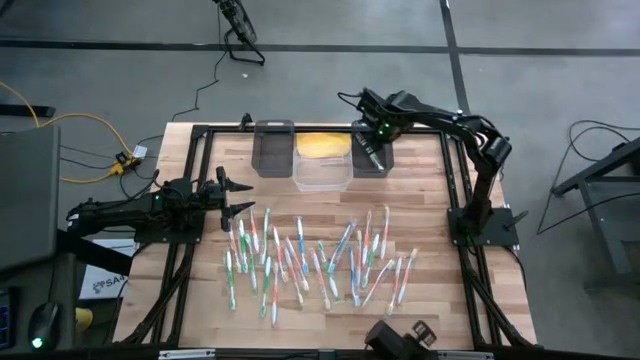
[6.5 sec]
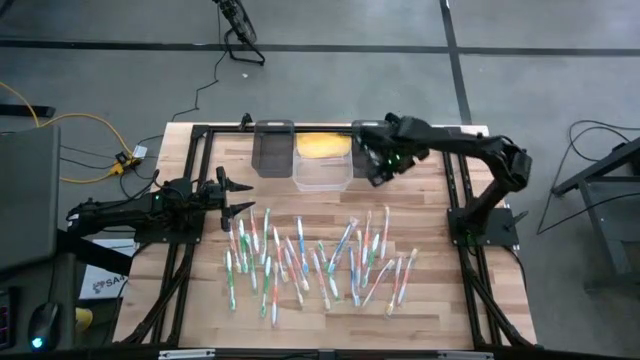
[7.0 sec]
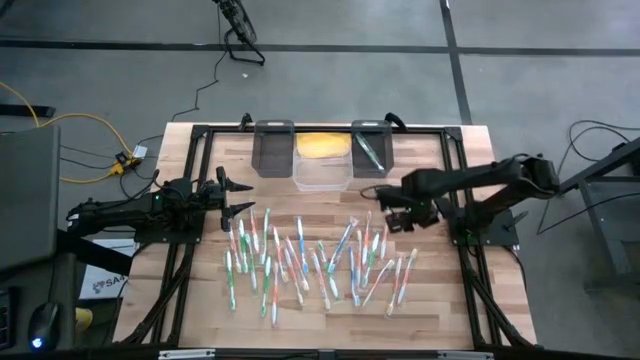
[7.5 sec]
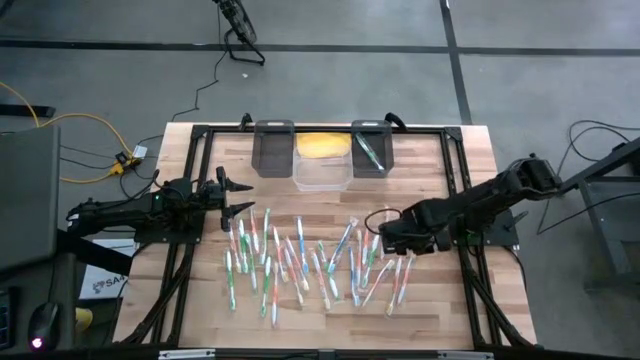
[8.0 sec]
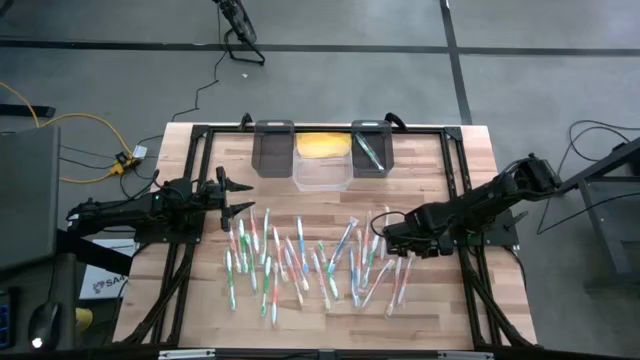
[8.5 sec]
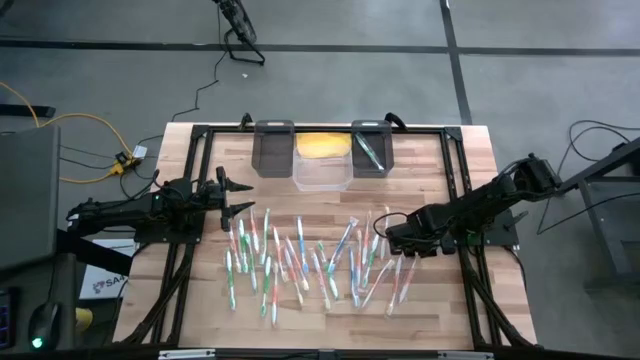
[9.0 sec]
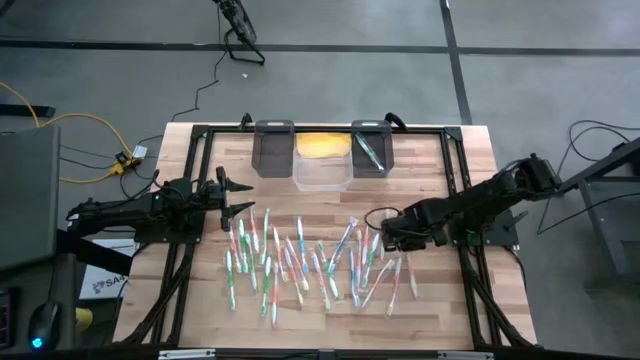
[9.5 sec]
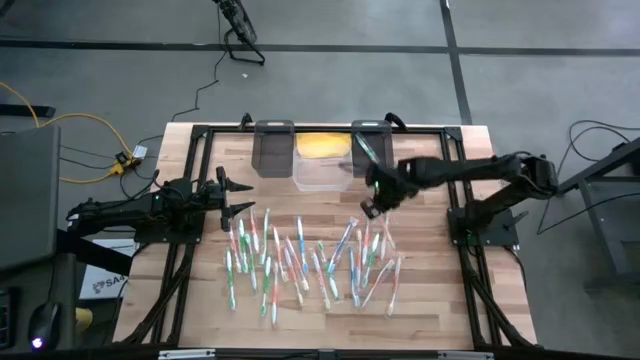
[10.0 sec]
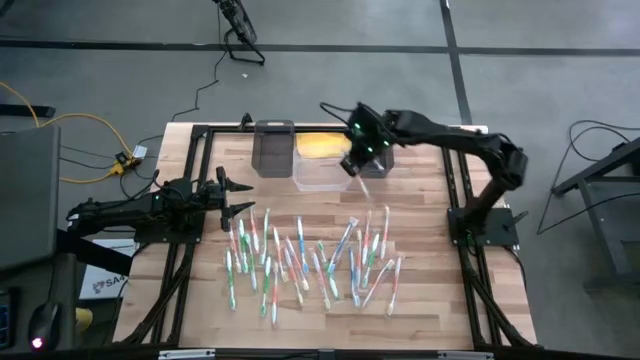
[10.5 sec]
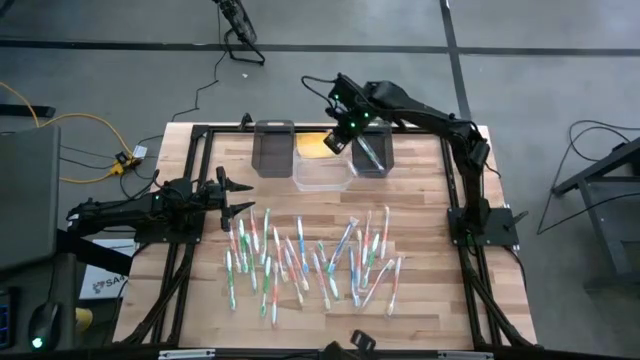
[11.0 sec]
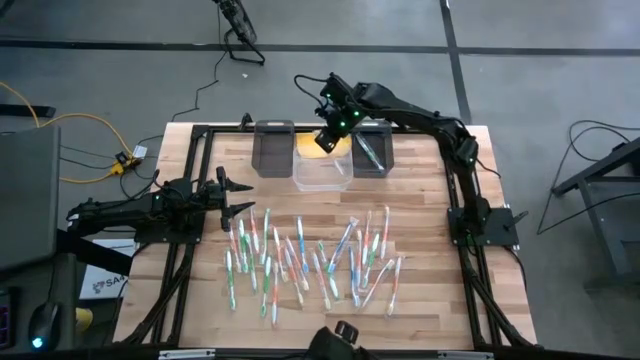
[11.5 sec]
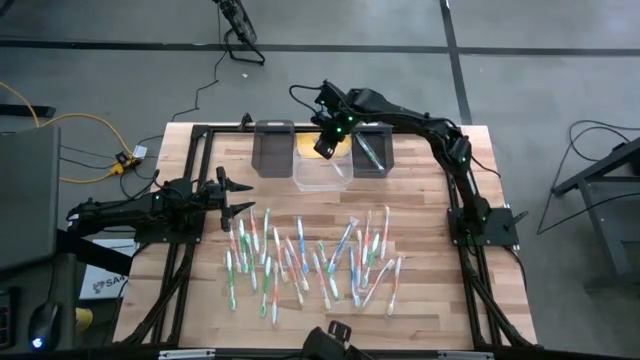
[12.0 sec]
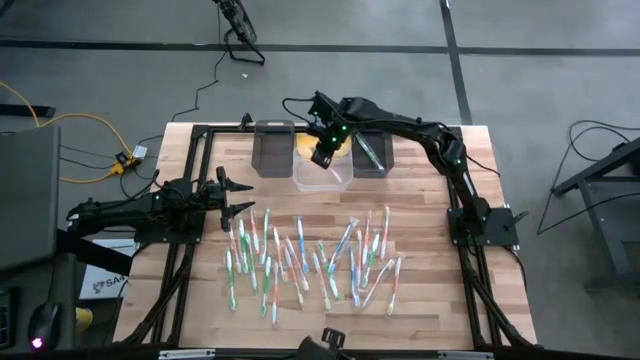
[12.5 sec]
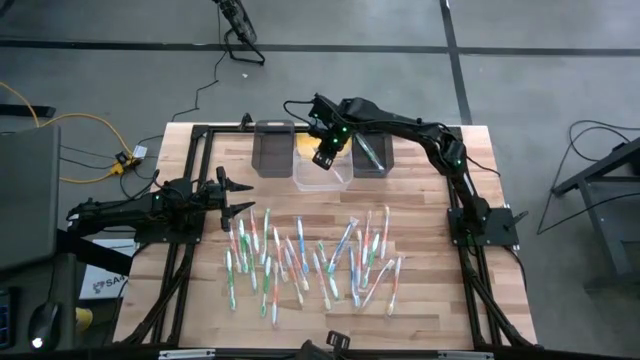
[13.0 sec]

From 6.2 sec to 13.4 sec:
Task: Pick & Place Toothbrushes
Put the orange toothbrush into the transparent bin

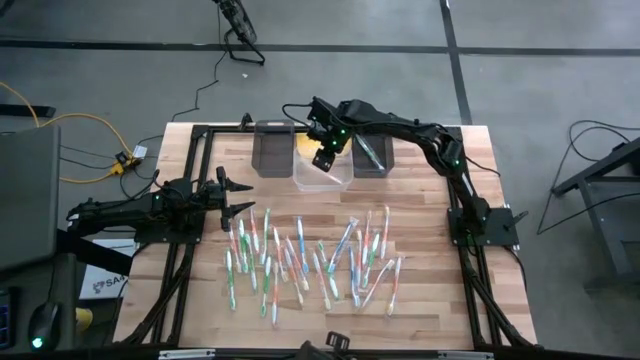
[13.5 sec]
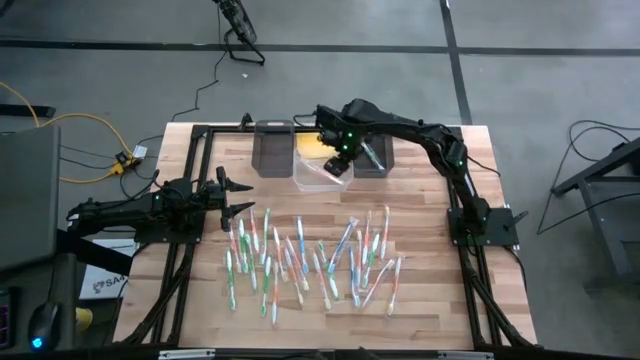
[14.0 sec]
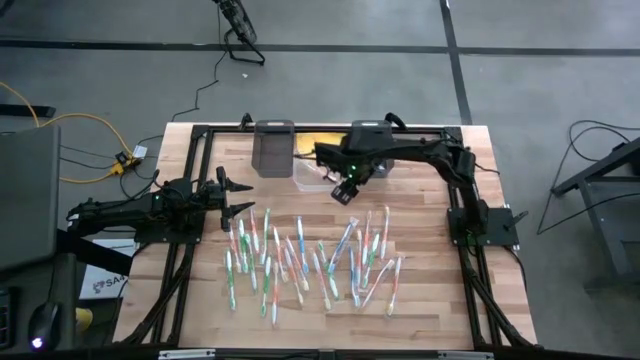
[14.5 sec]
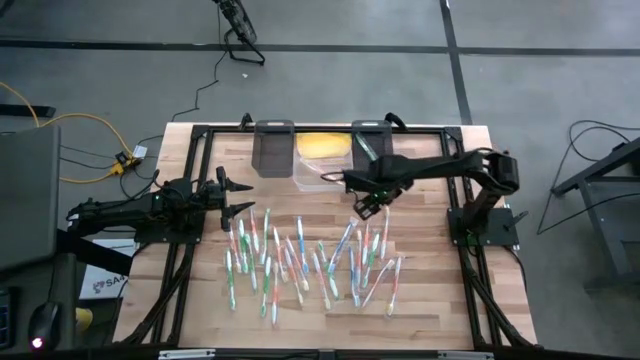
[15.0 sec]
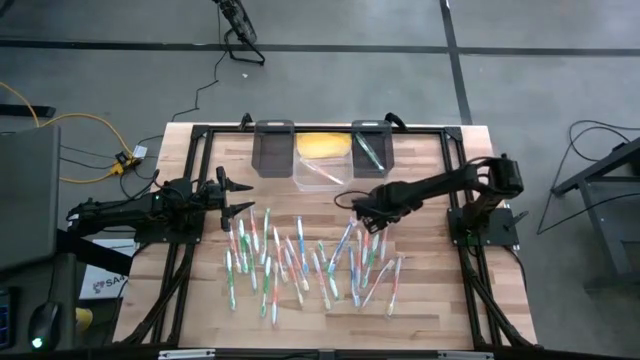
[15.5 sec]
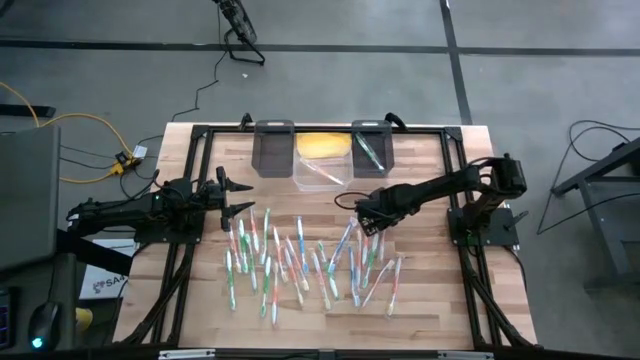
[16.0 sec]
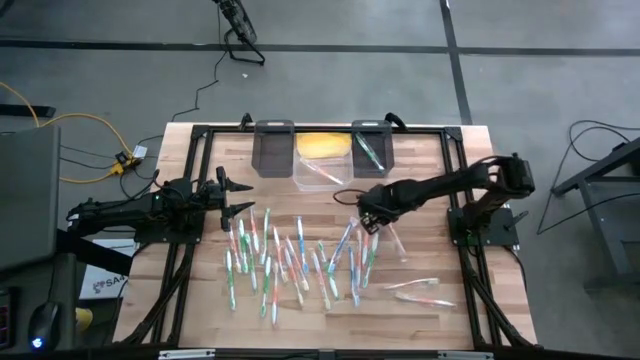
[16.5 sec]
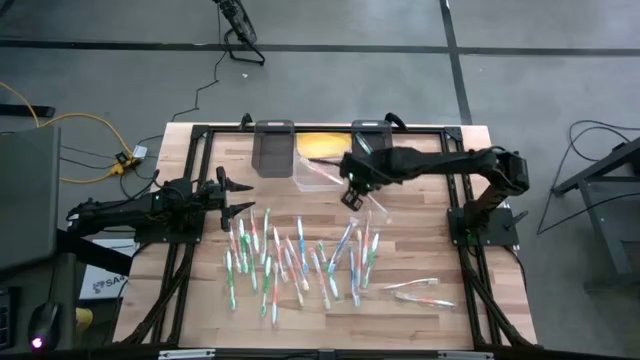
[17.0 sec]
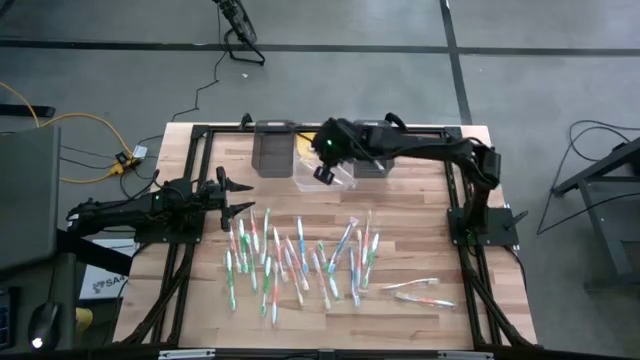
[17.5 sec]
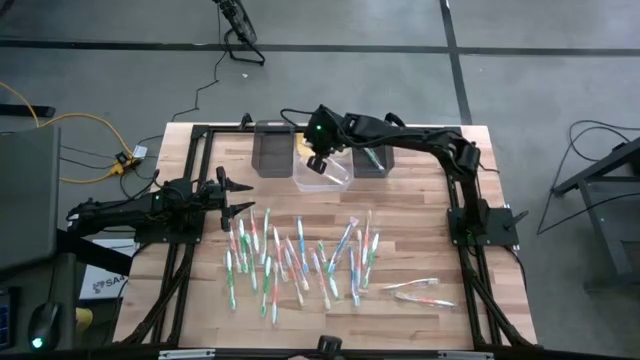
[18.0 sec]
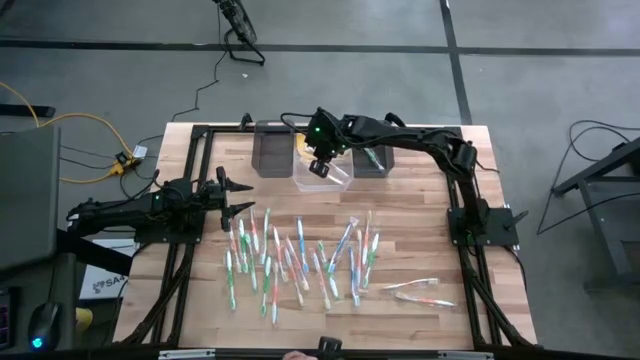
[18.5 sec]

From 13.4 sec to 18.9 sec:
Put the orange toothbrush into the transparent bin

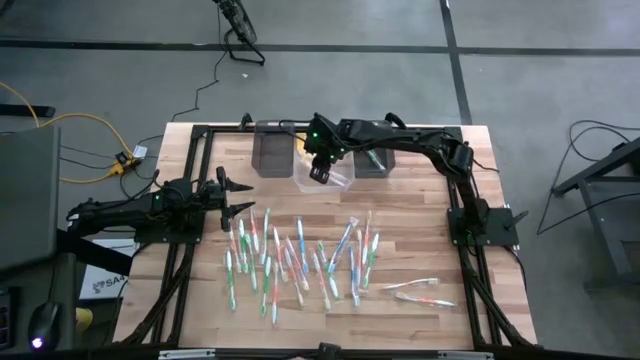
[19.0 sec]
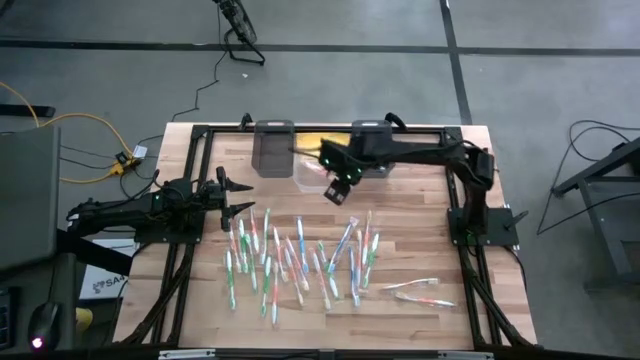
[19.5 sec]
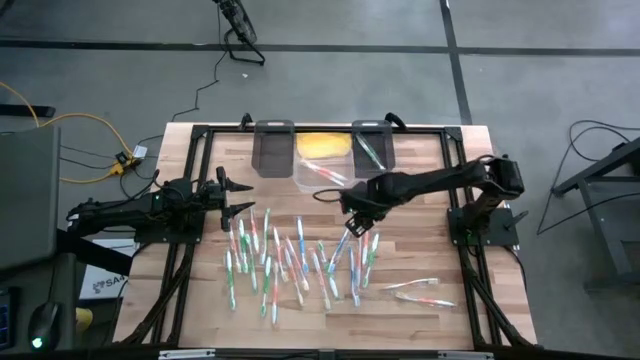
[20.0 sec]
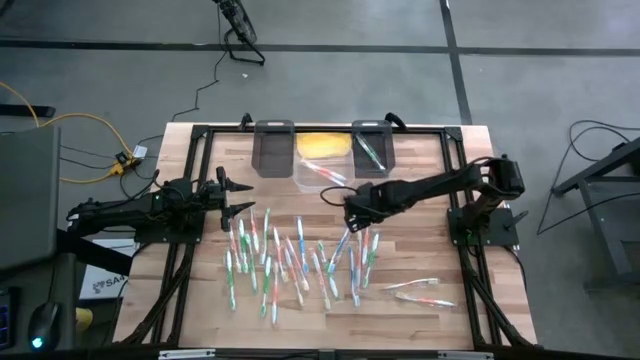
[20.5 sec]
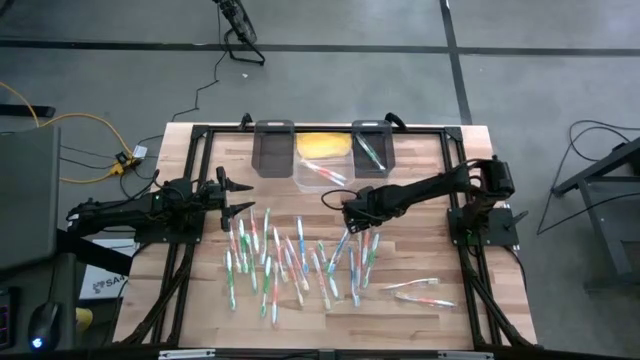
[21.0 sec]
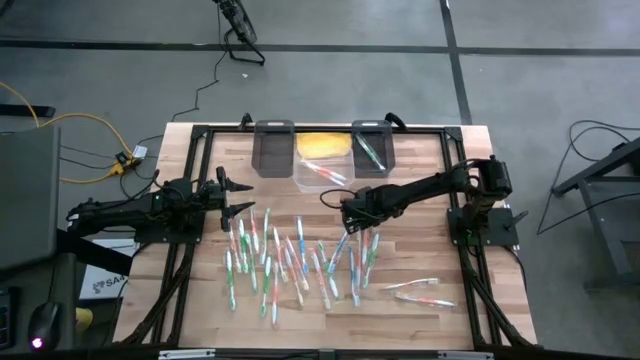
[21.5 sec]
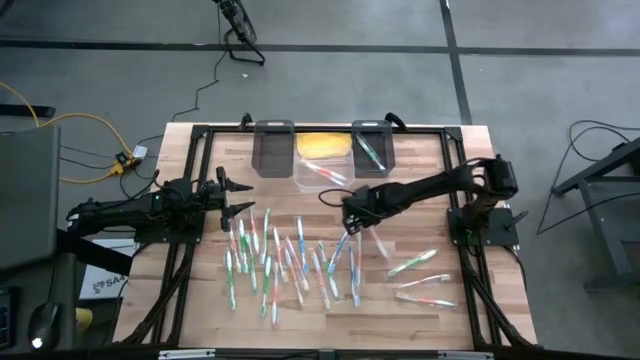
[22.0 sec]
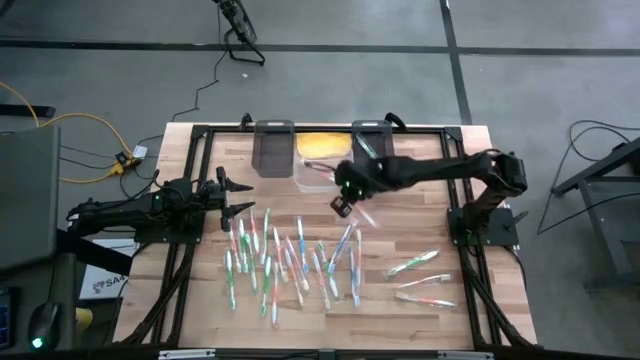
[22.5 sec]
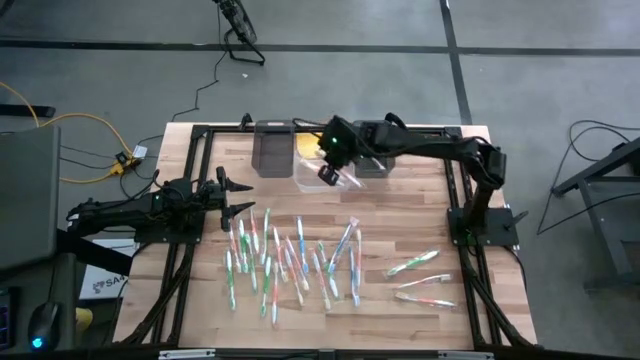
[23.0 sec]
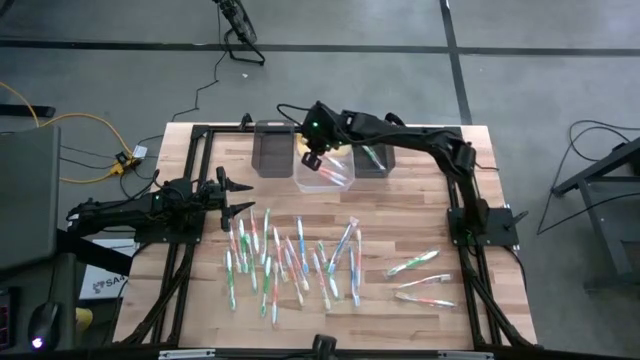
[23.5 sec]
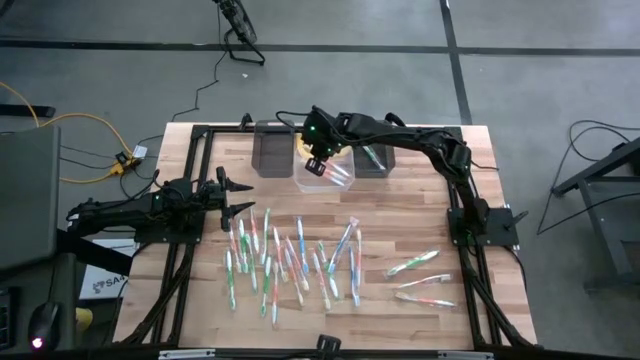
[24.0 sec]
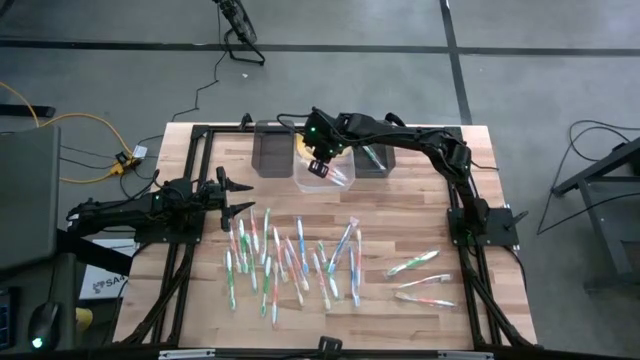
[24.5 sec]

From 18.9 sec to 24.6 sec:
Put the orange toothbrush into the transparent bin

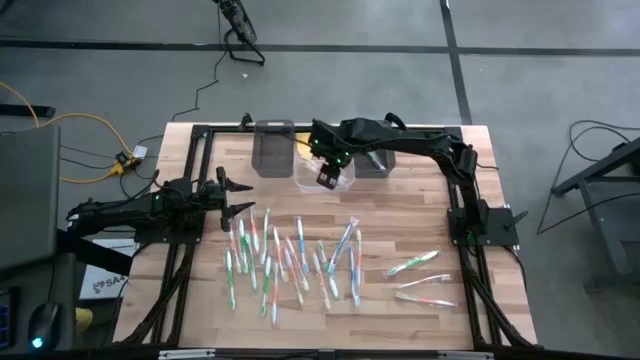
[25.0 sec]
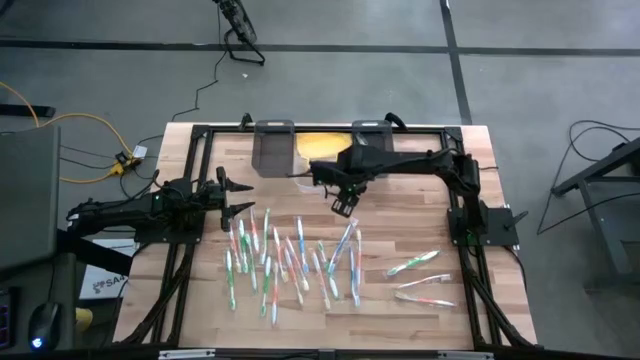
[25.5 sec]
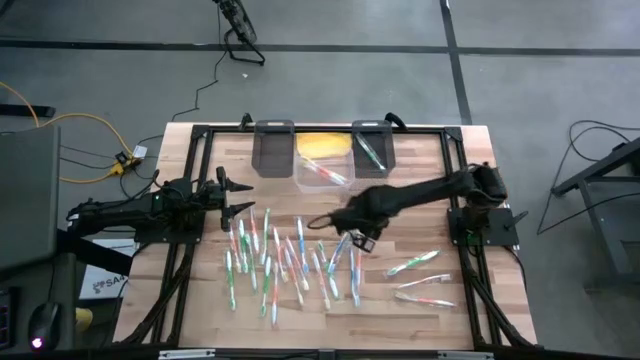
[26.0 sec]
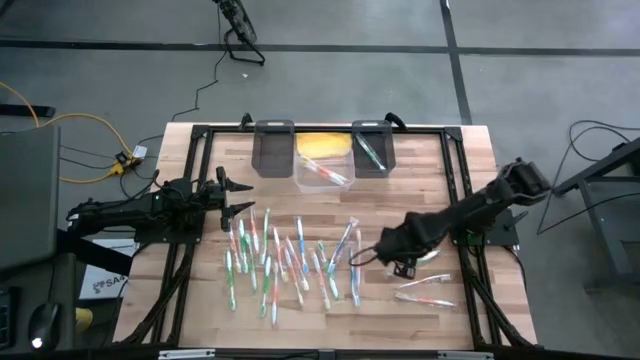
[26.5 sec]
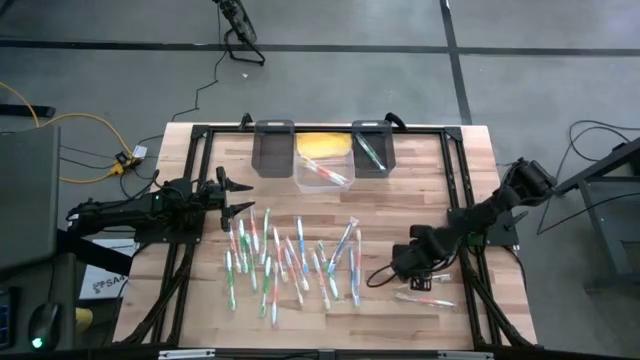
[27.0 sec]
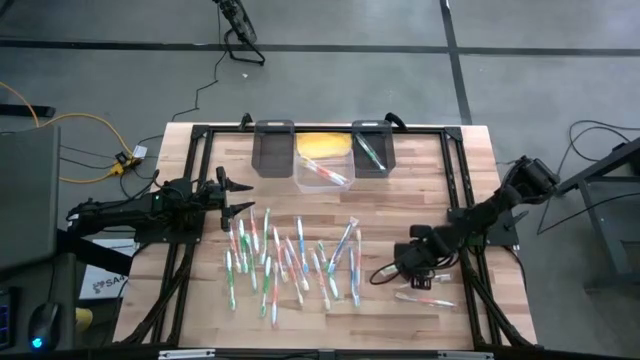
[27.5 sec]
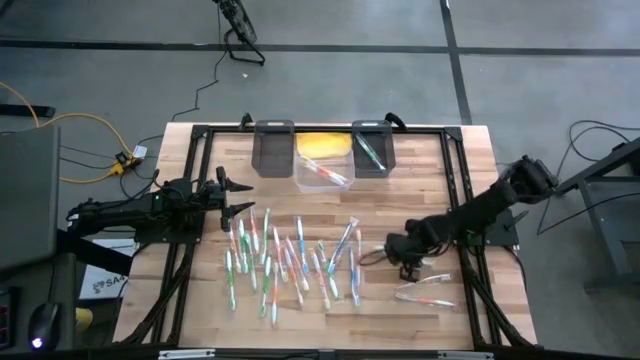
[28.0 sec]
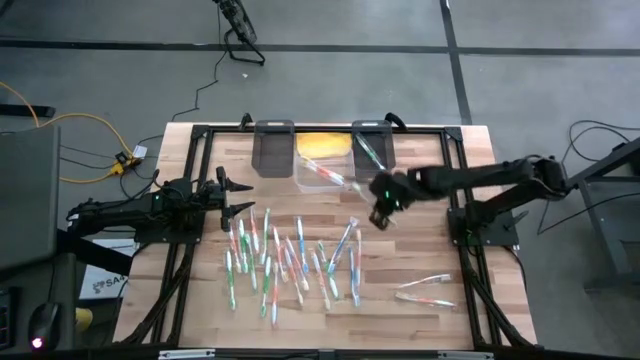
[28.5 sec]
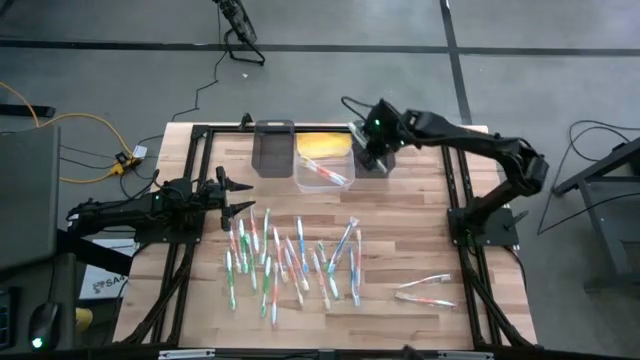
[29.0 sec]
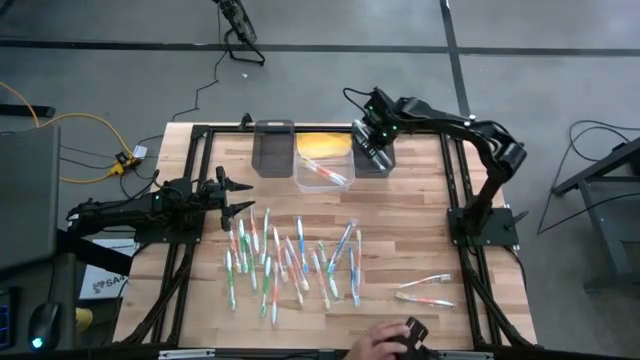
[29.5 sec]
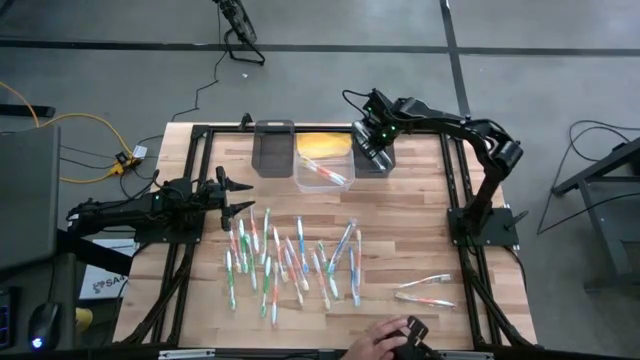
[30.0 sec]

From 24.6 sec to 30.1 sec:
Put the green toothbrush into the right black bin
